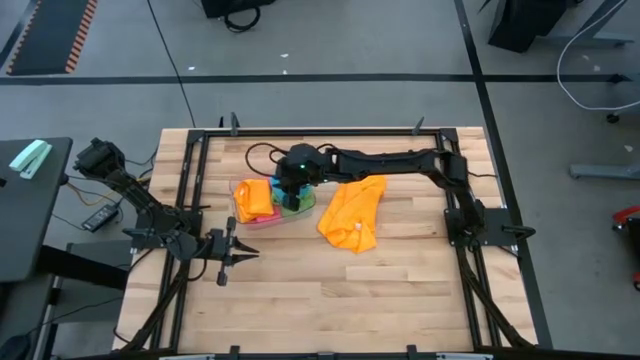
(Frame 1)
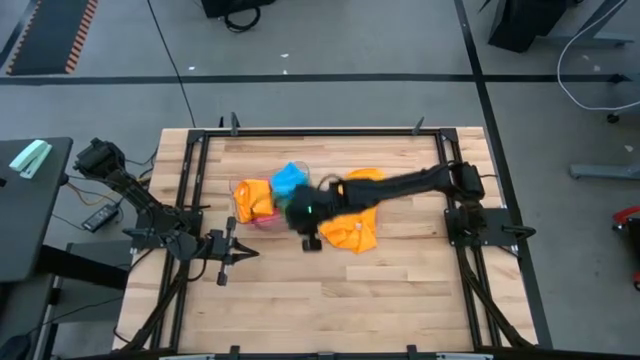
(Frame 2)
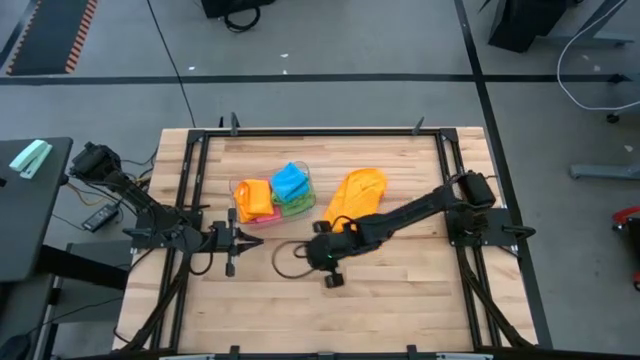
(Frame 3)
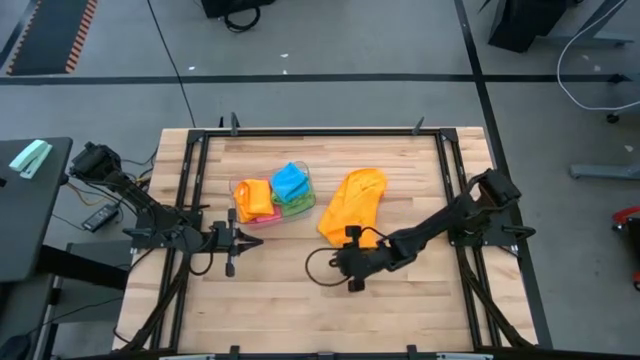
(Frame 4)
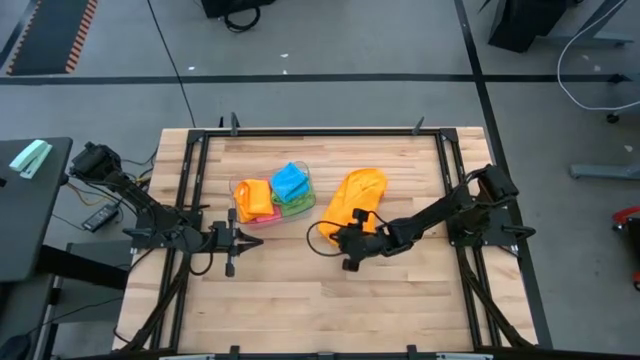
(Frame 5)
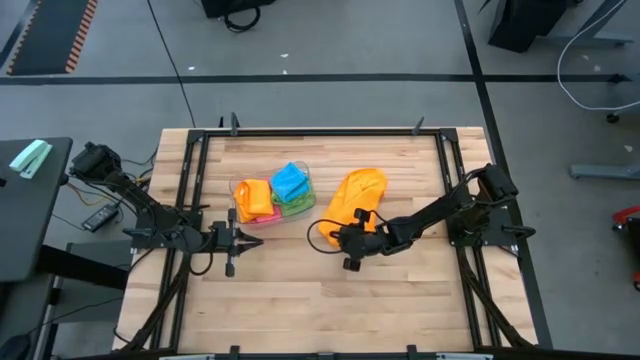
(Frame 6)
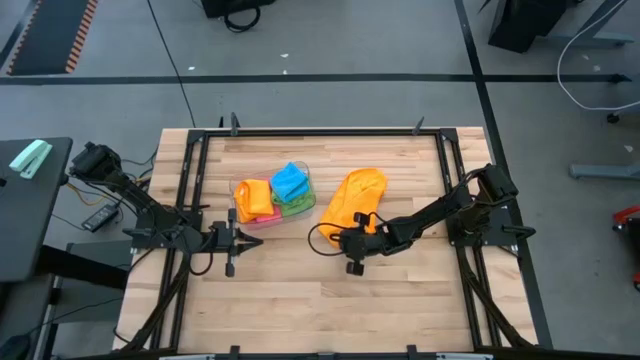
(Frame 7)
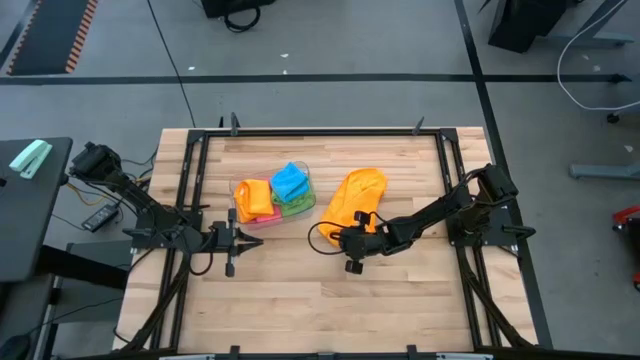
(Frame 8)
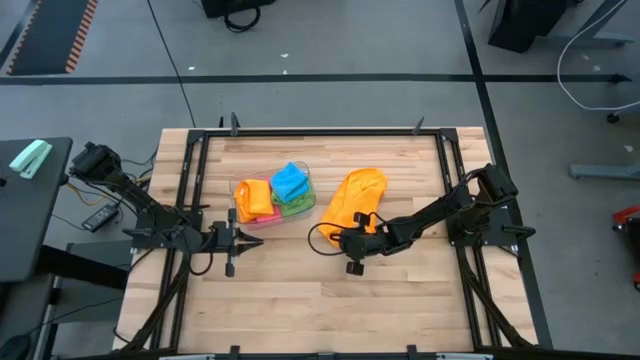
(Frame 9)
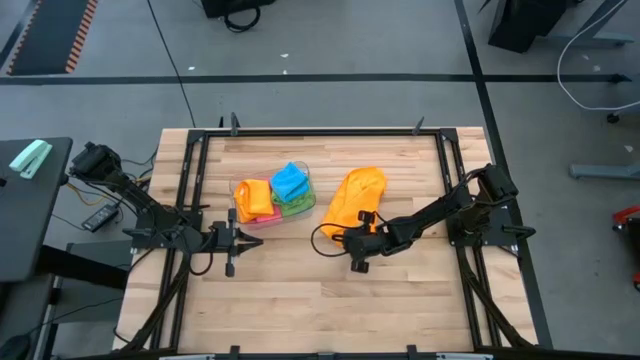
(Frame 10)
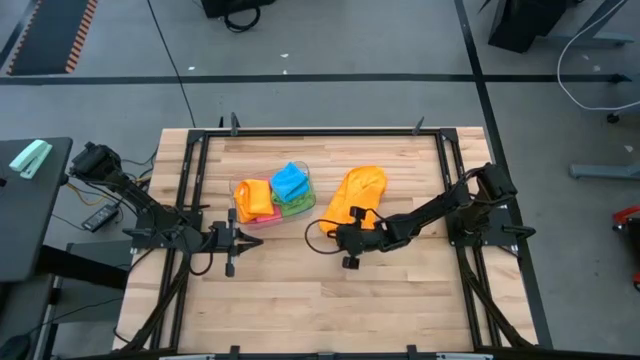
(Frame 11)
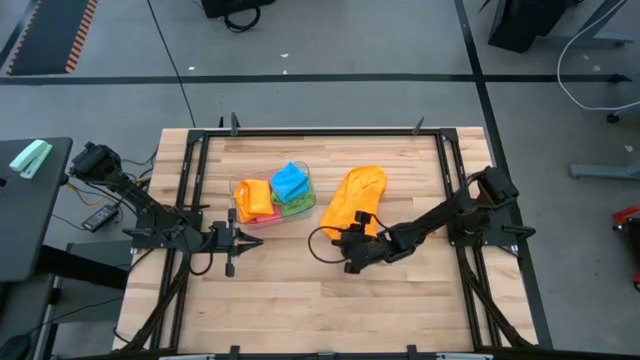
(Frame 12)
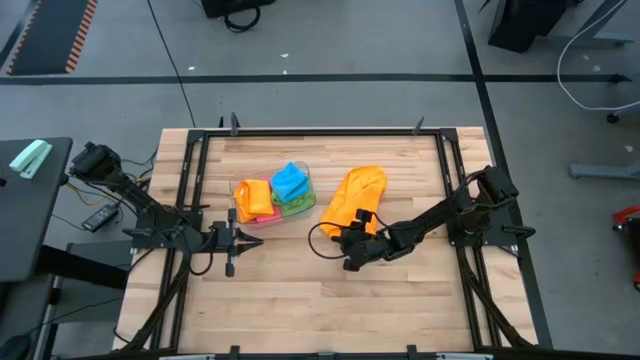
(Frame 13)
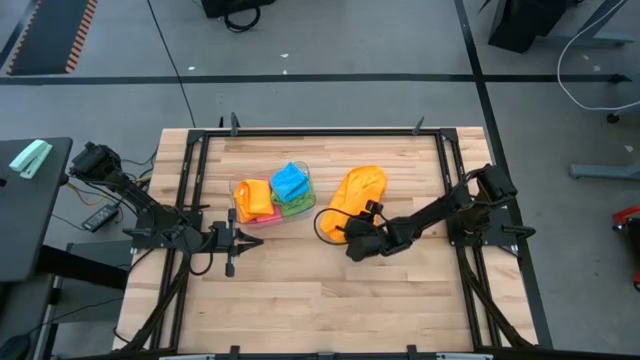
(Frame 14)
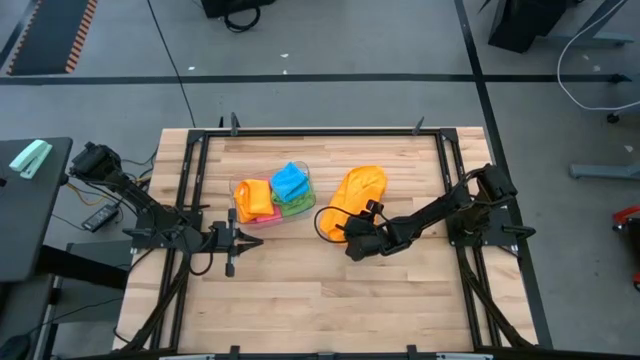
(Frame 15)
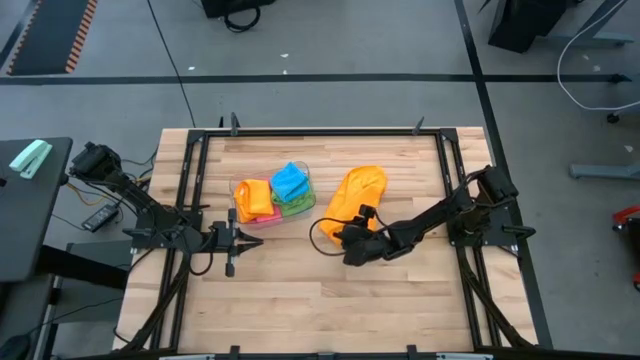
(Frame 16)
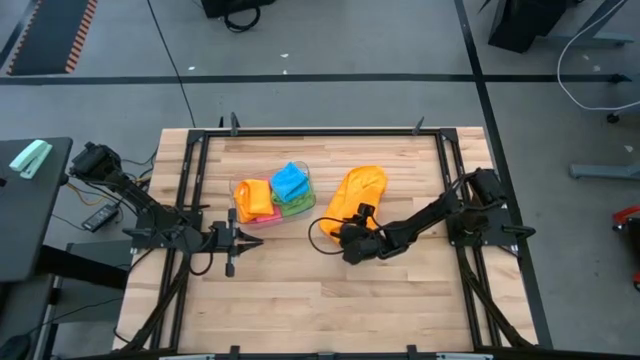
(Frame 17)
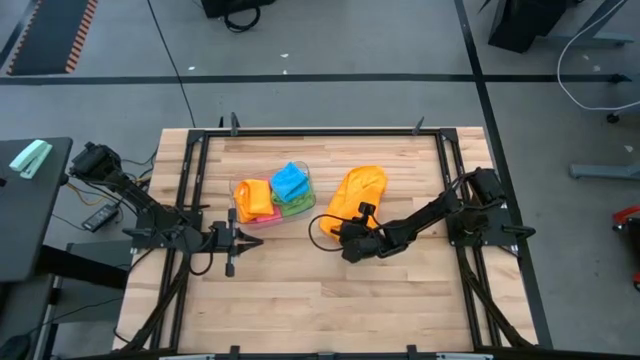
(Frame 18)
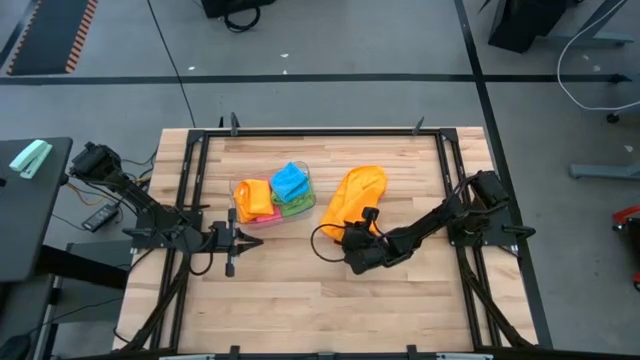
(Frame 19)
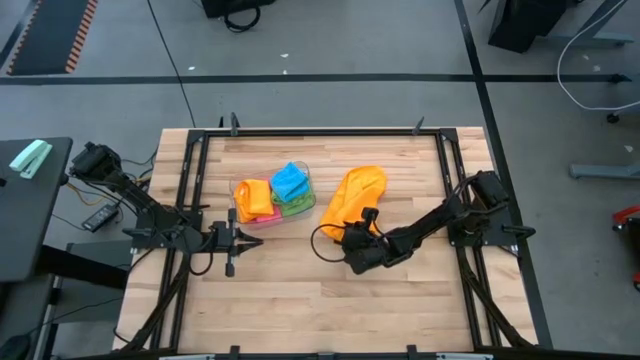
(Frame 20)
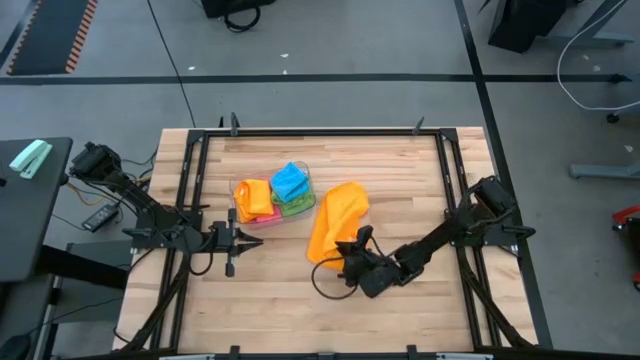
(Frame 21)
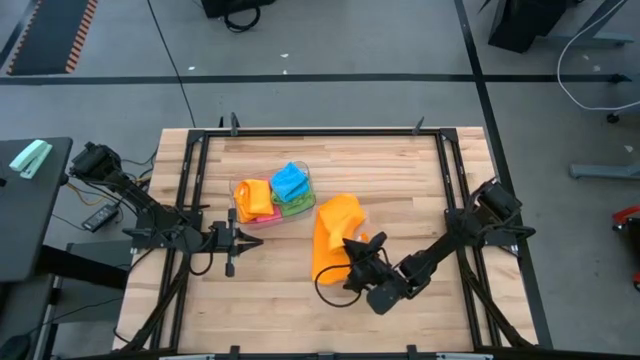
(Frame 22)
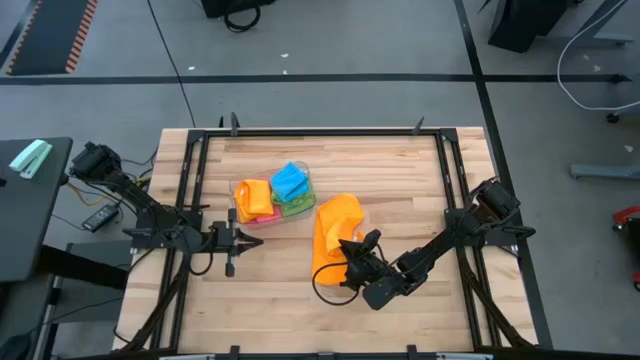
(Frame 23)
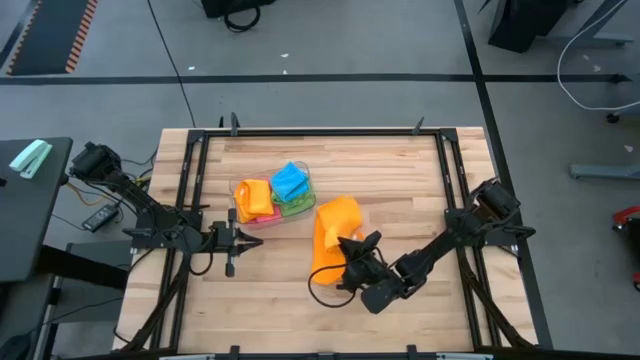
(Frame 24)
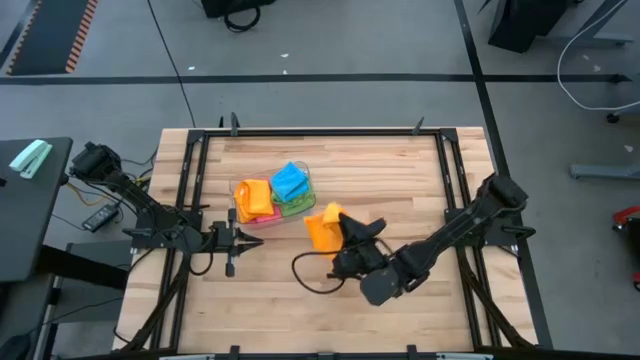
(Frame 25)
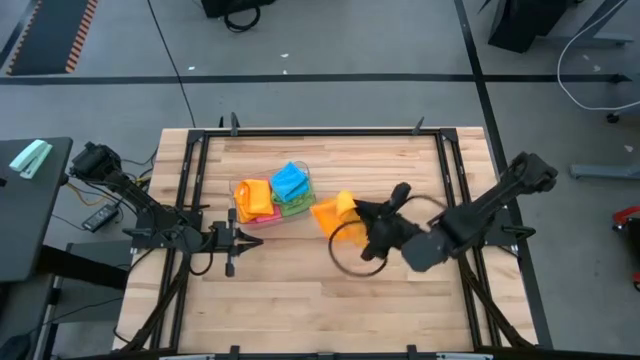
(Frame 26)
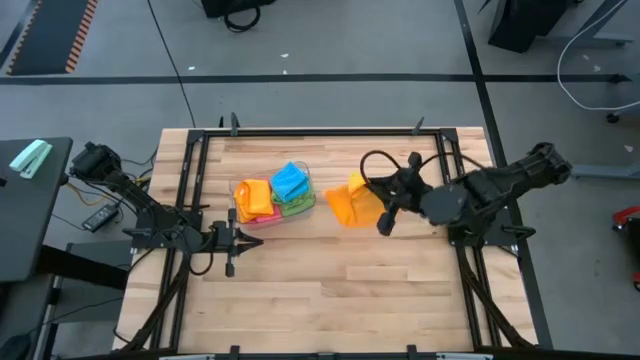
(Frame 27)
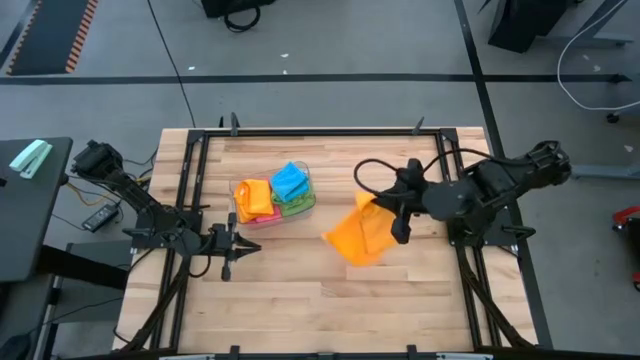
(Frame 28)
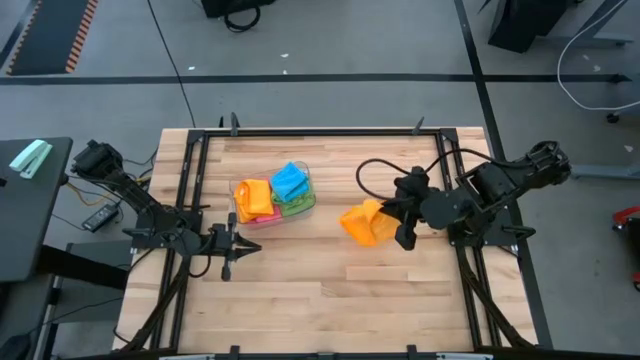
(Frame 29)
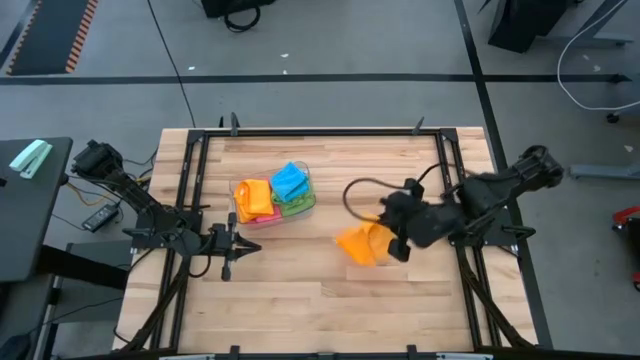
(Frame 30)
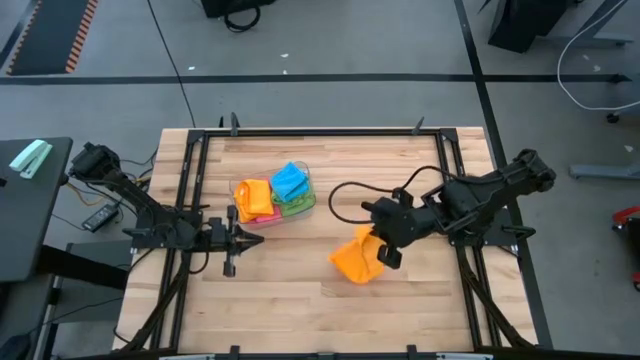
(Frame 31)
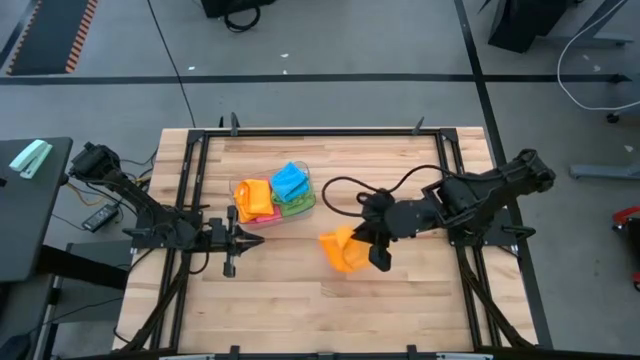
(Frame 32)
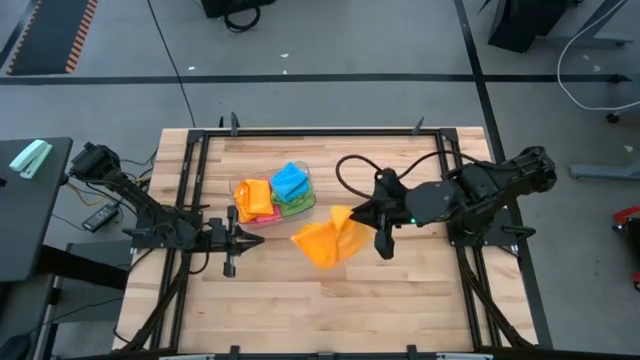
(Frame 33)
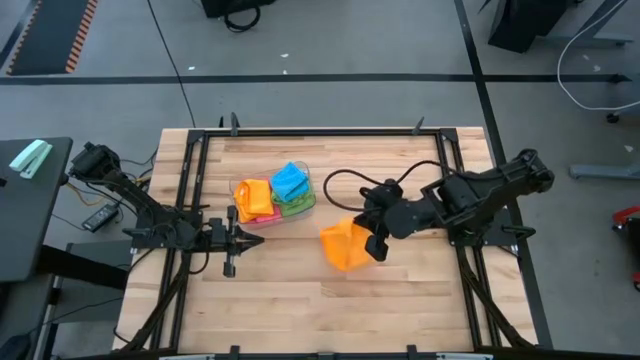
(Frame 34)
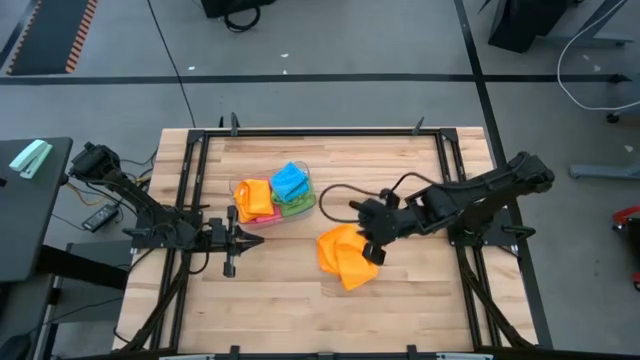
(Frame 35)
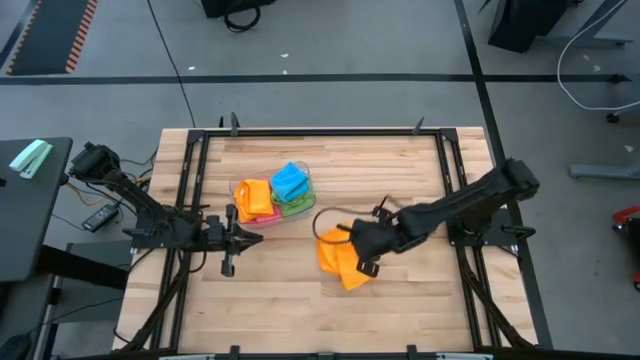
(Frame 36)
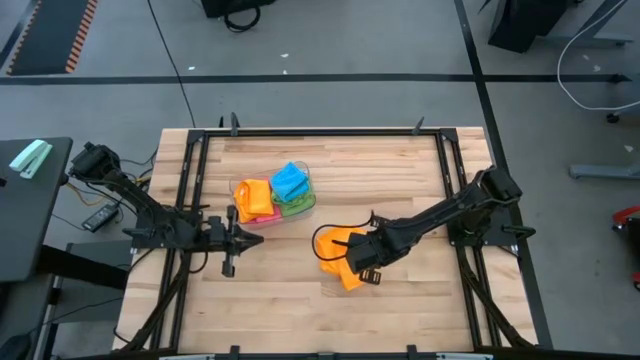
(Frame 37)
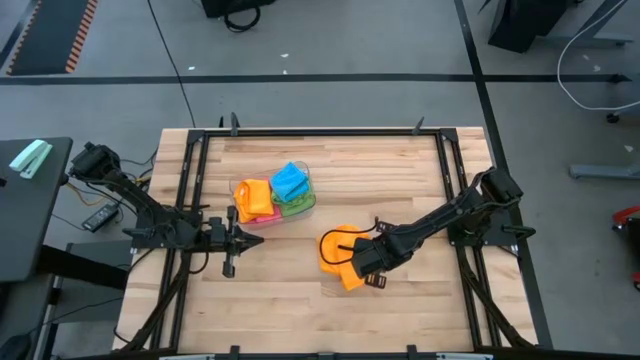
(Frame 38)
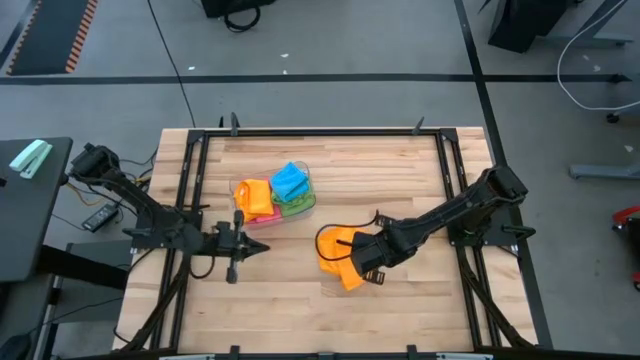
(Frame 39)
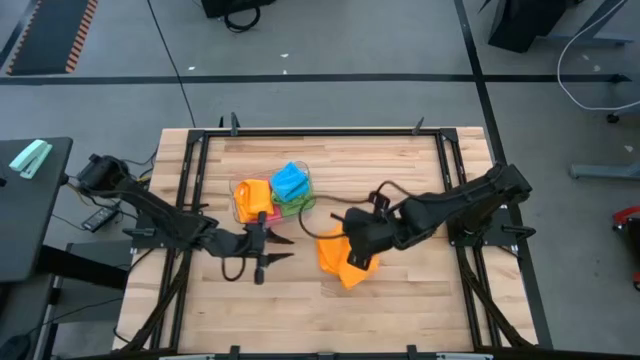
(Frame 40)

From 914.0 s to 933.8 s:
Task: Fold microfiber towels
Fold the yellow microfiber towel
